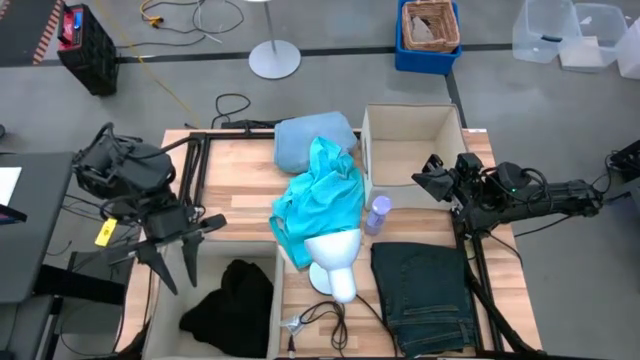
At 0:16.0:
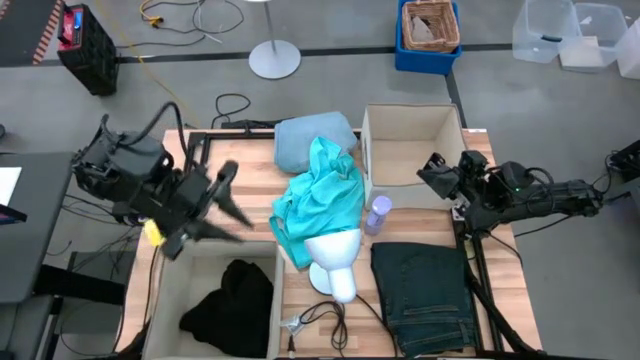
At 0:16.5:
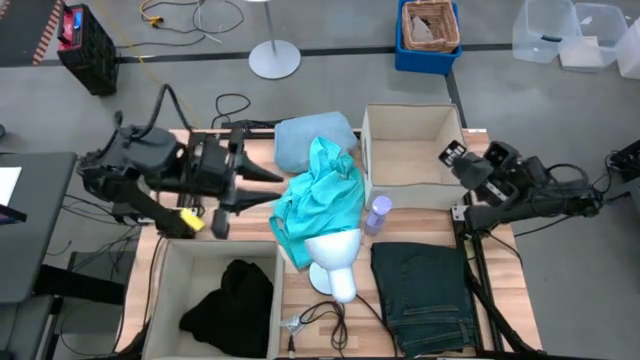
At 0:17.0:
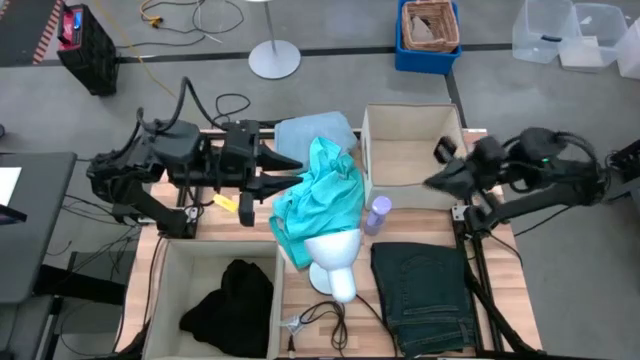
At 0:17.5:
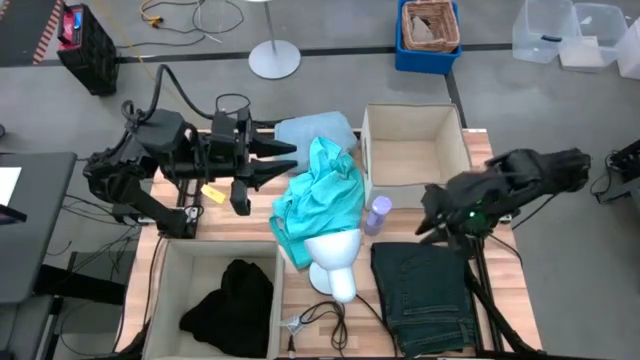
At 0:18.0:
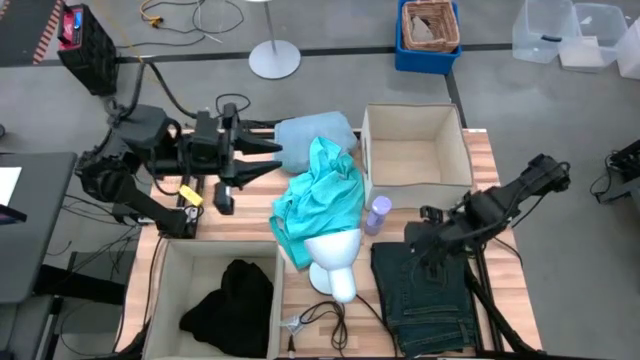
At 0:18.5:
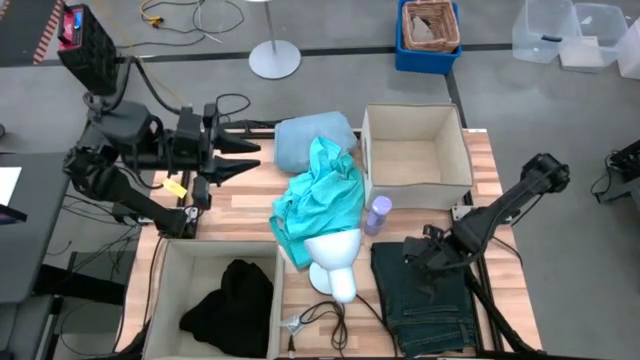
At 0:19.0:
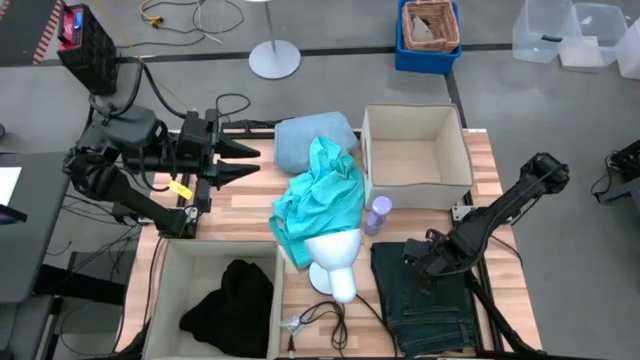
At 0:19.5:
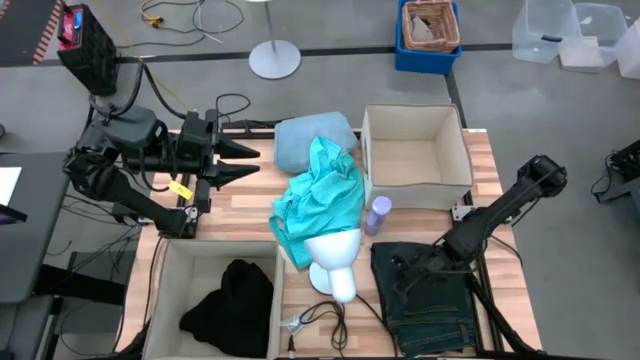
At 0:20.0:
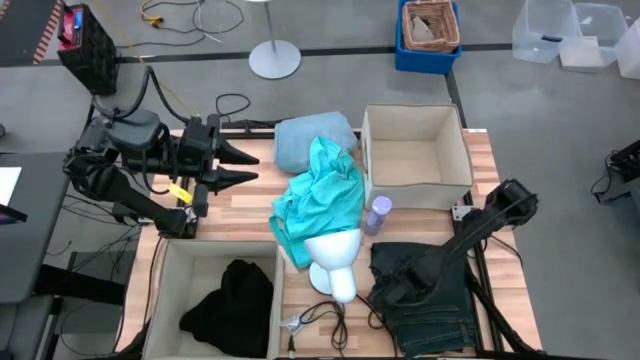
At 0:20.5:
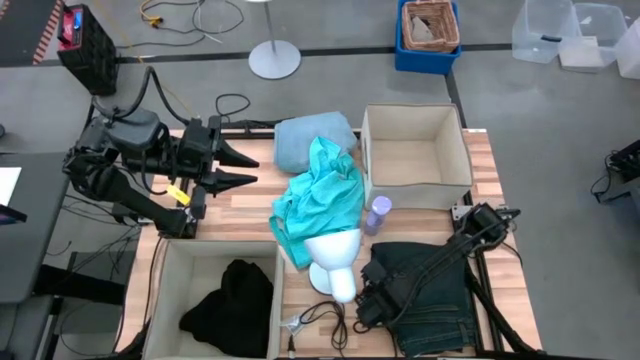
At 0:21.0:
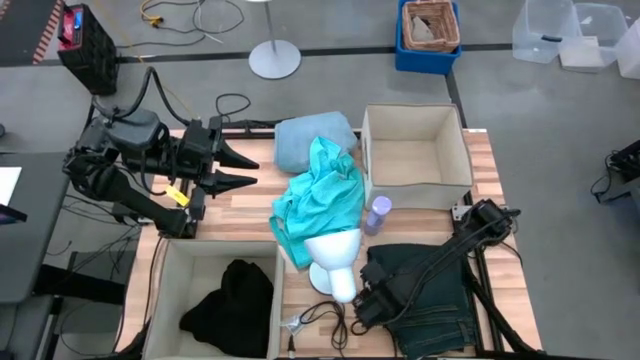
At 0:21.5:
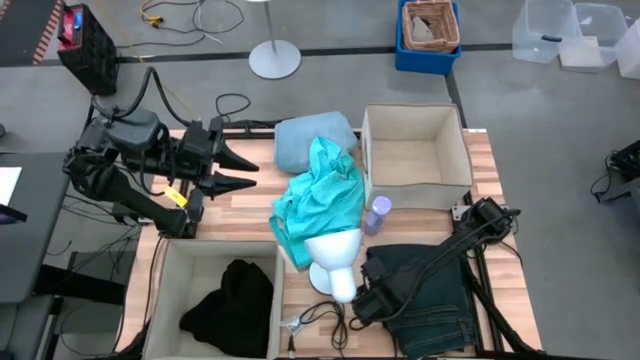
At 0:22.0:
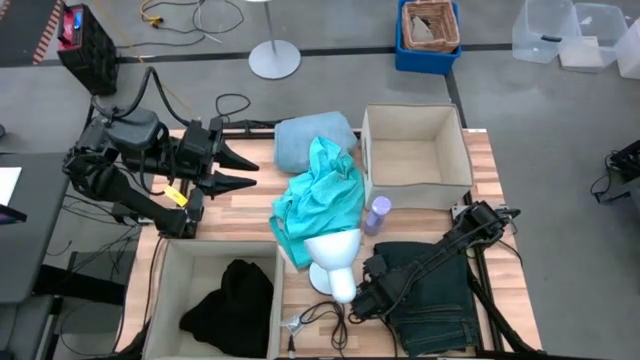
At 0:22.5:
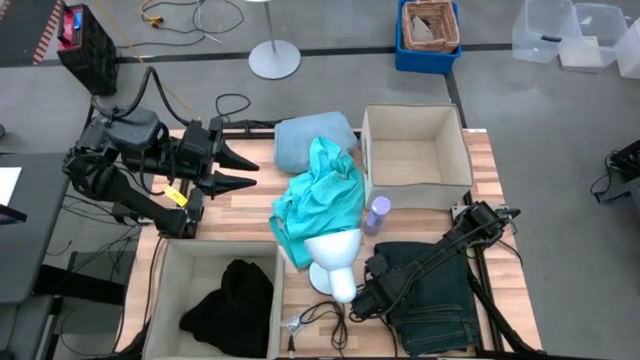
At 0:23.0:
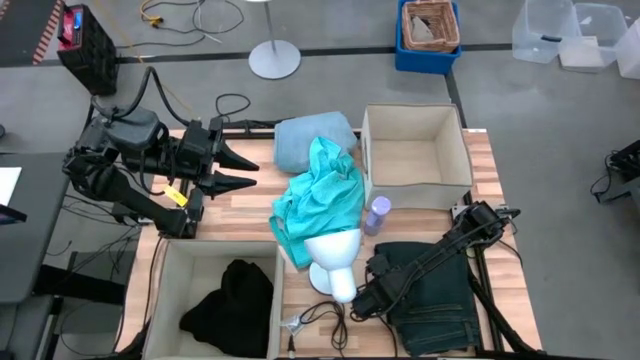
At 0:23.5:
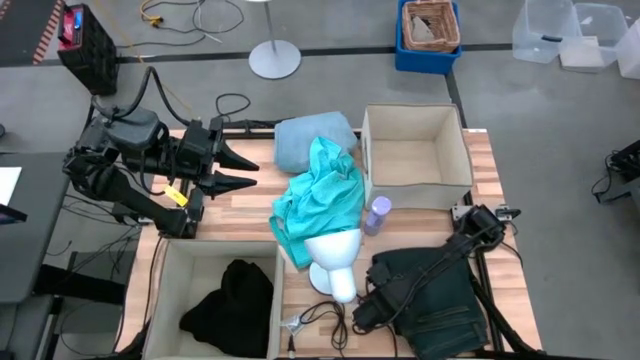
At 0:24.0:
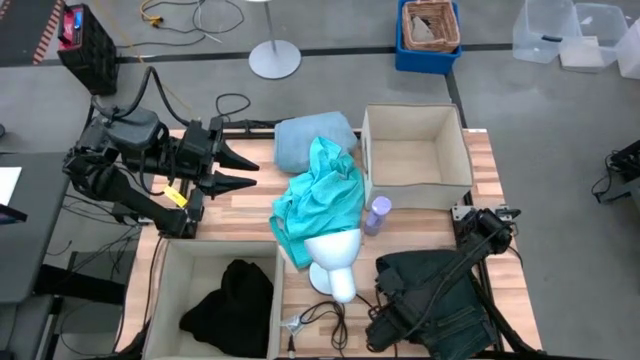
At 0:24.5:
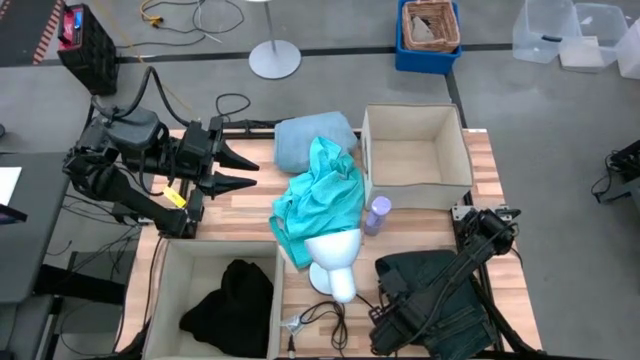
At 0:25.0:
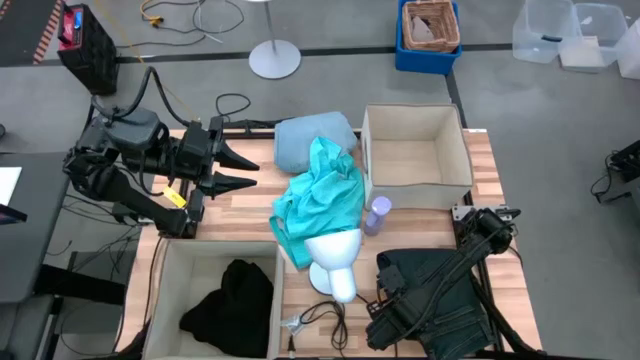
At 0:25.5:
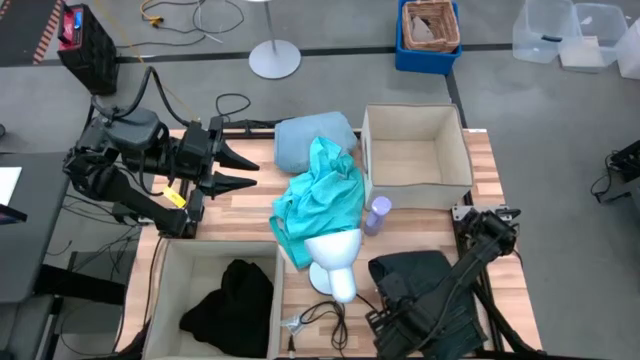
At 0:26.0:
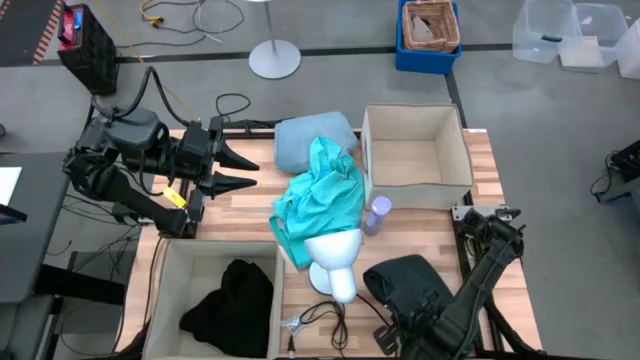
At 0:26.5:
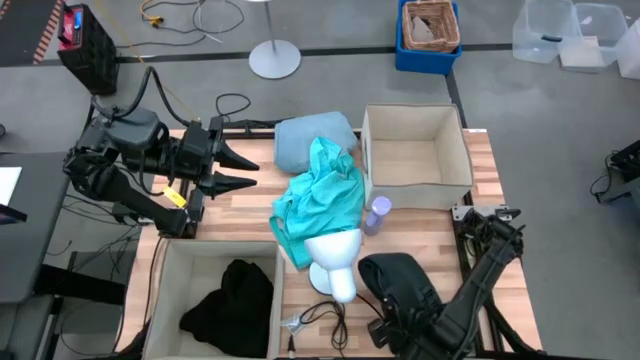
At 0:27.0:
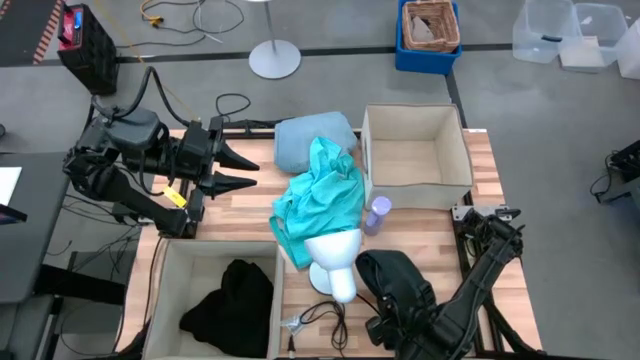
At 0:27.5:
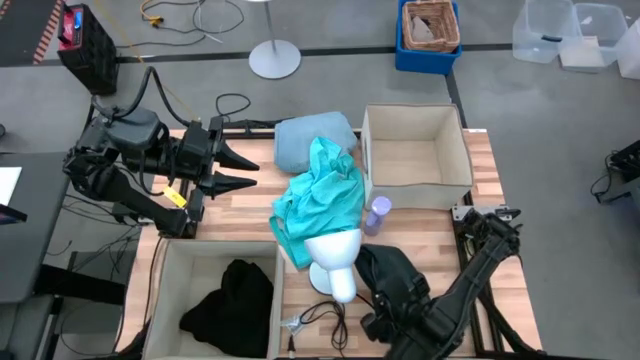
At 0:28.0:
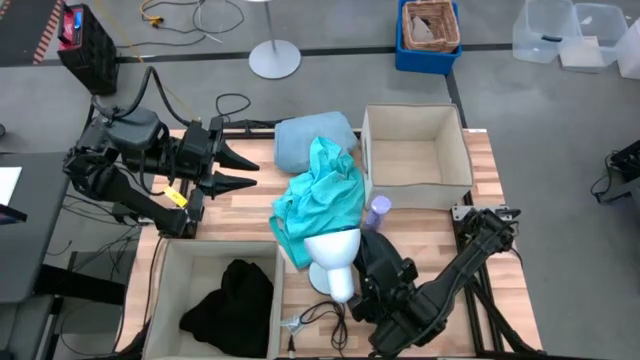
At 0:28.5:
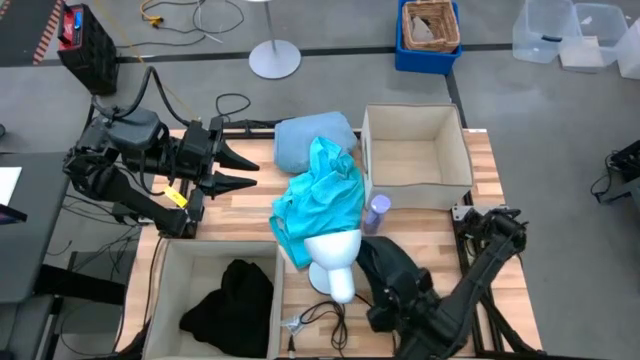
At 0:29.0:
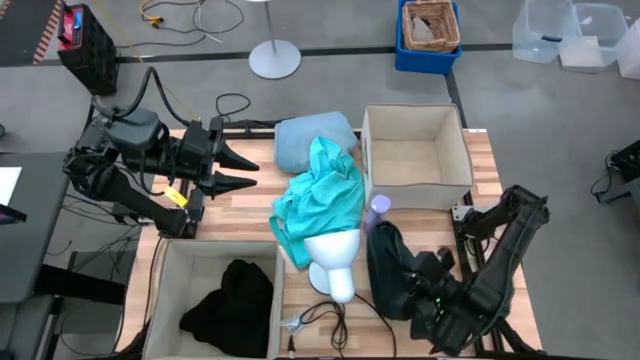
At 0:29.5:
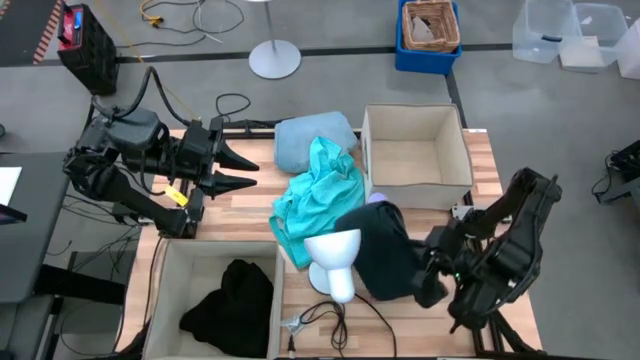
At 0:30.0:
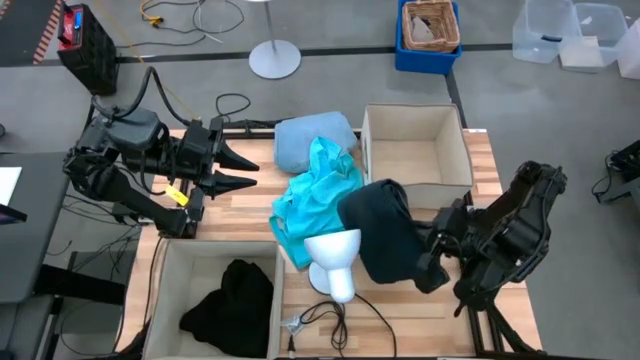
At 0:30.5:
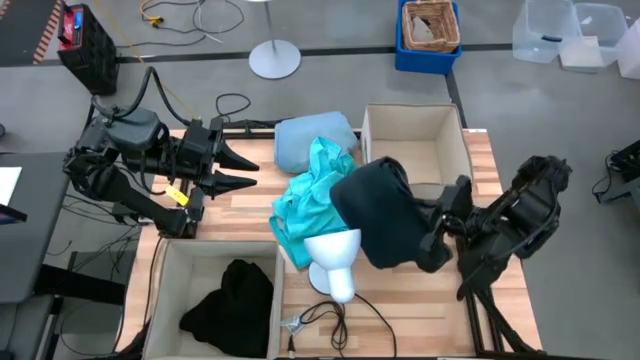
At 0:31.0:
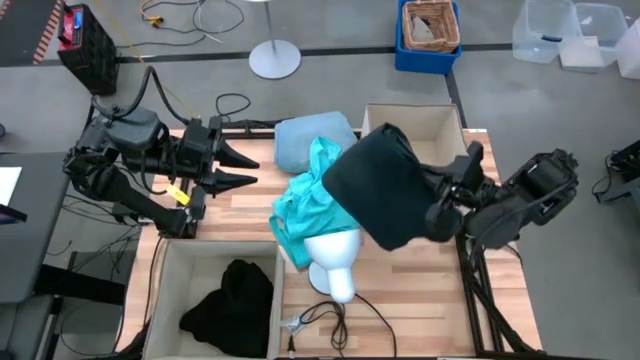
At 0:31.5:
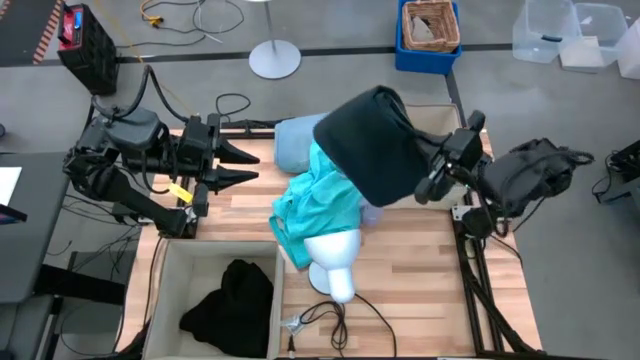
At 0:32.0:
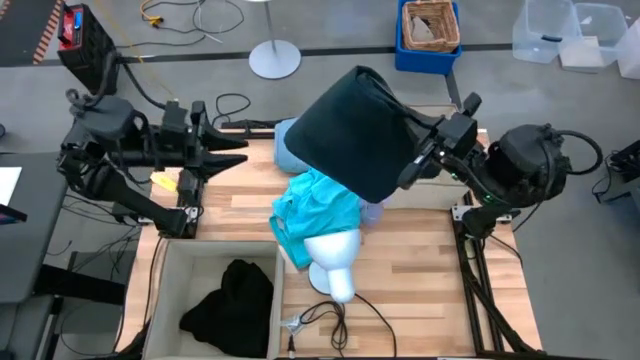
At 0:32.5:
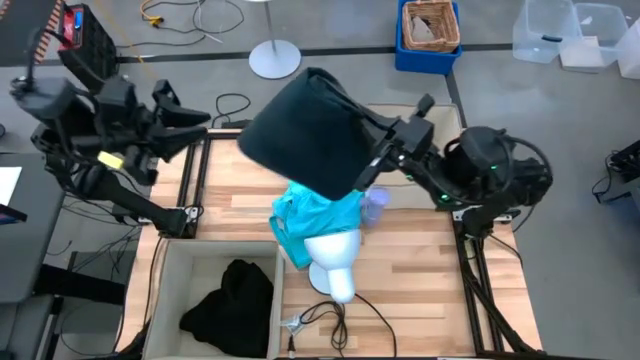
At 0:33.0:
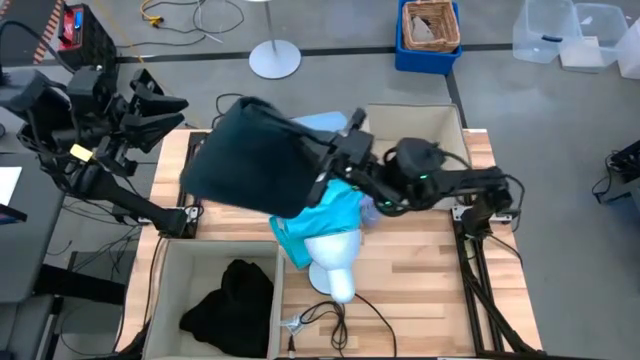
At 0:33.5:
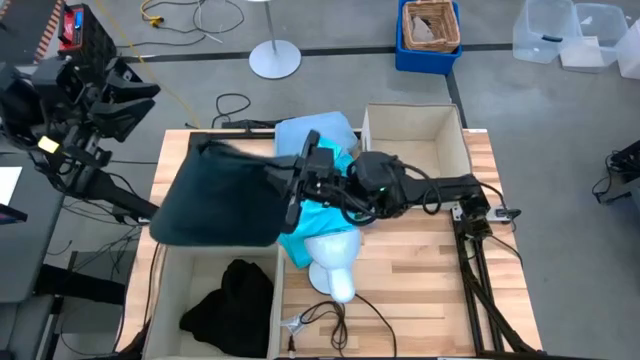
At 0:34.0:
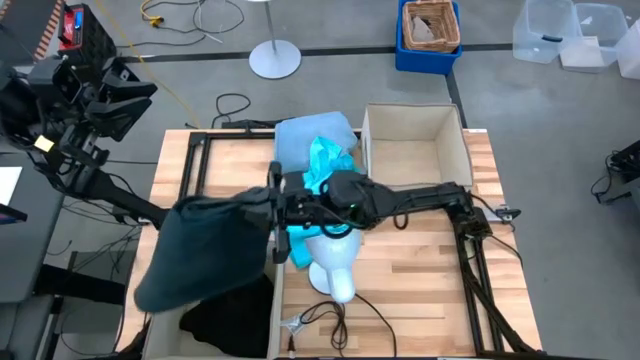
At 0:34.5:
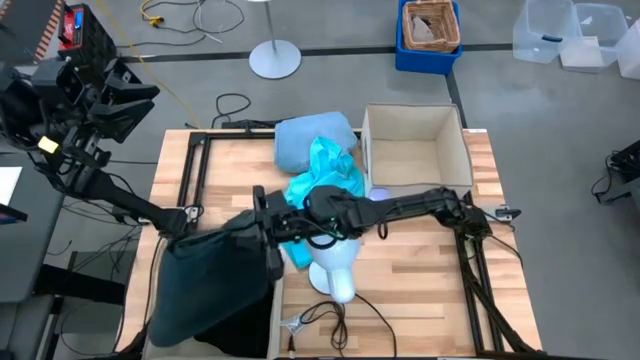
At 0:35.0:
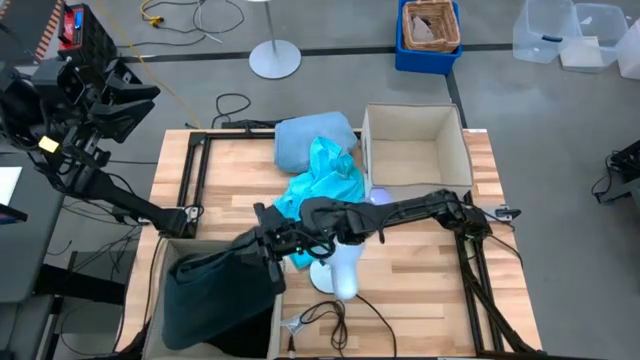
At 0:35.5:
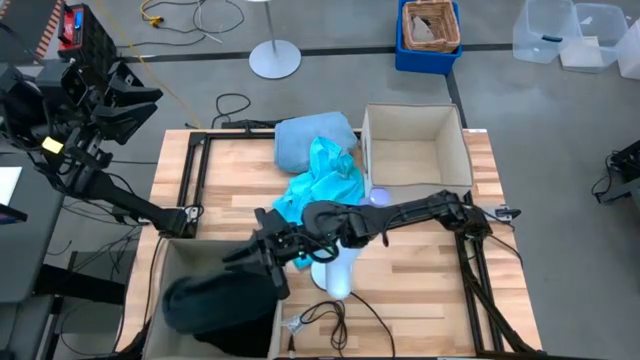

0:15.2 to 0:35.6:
Task: Sort clothes
Put the blue jeans into the bottom laundry organizer
